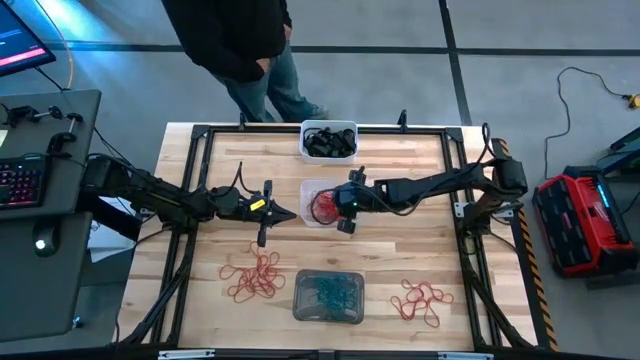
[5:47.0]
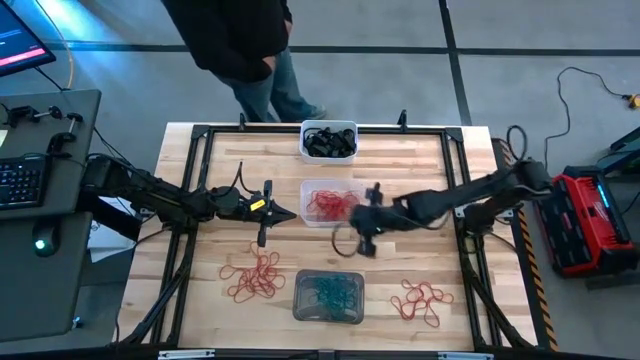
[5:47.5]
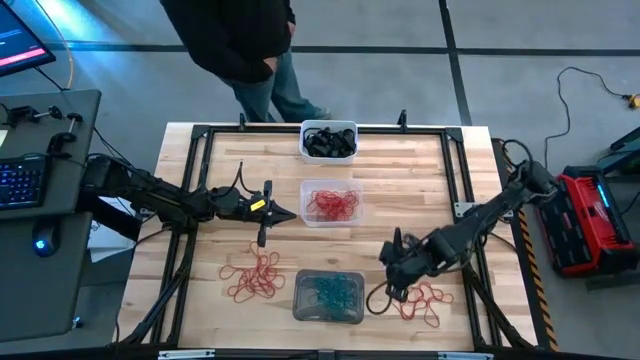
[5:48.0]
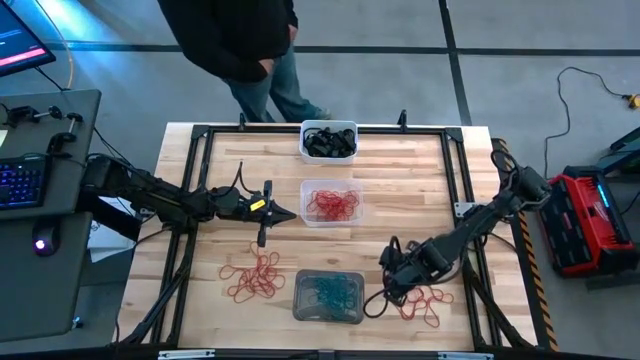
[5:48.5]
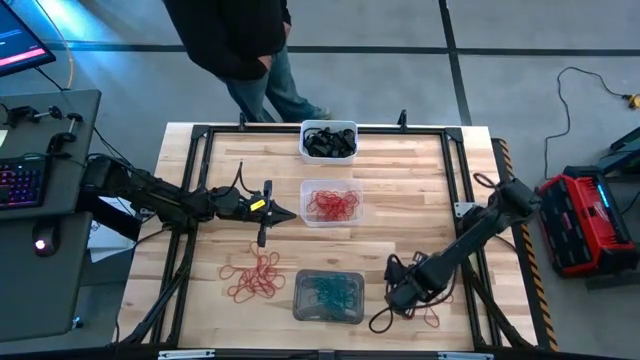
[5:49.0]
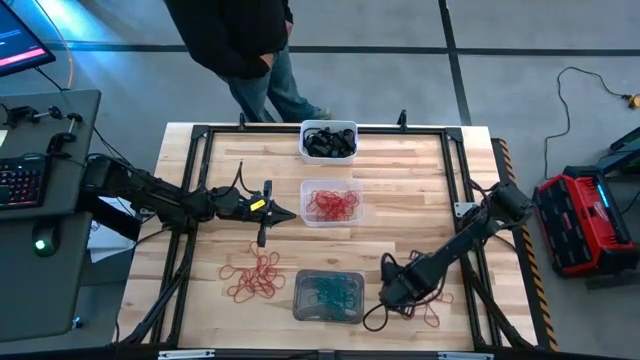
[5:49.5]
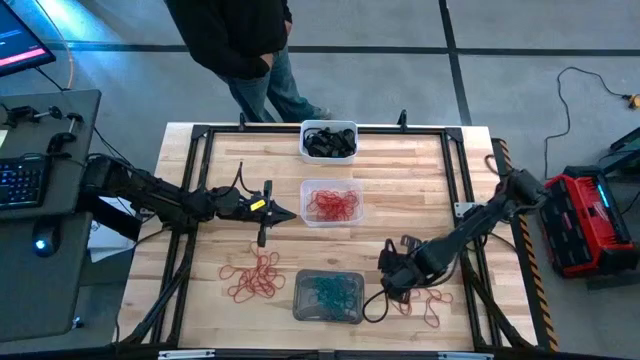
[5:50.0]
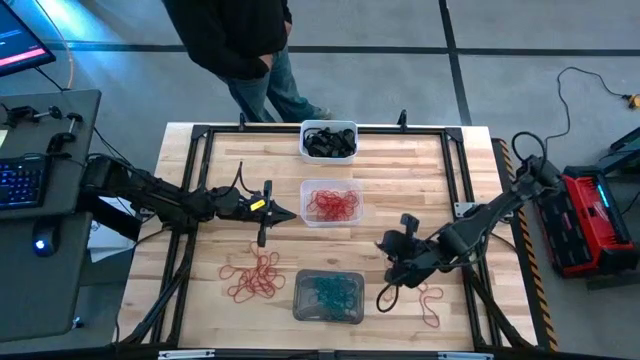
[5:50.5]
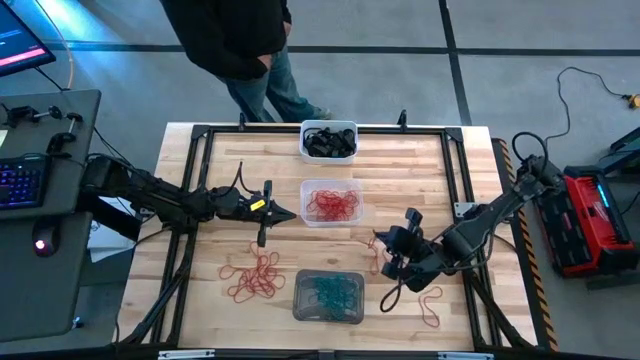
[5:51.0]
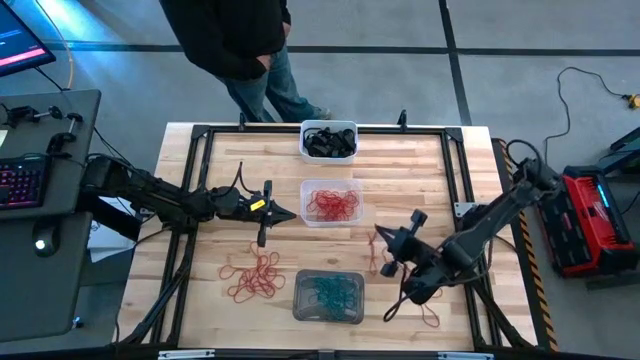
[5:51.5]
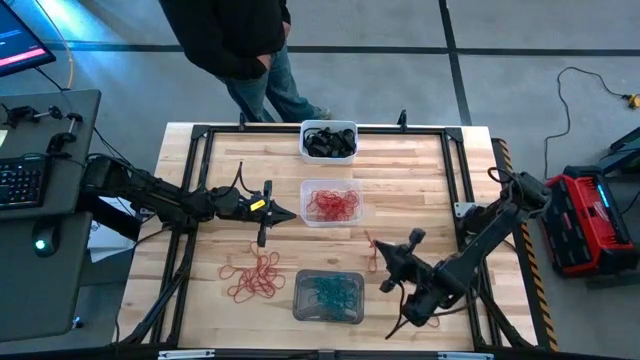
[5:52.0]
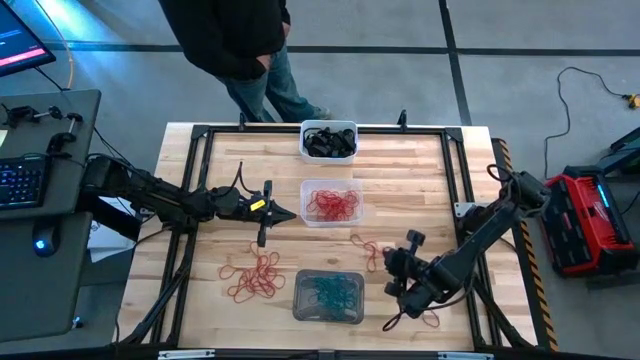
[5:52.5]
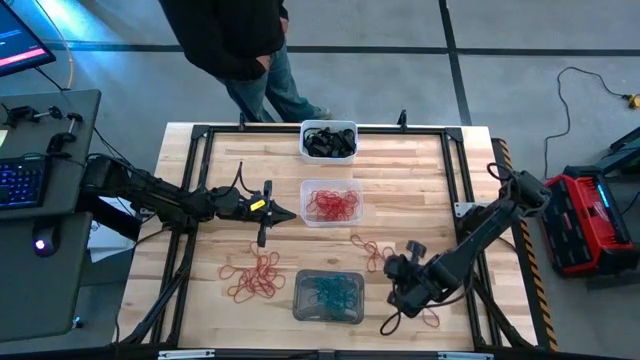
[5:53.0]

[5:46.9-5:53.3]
Task: Sort rubber bands into baskets
Put the red rubber band into the transparent bin

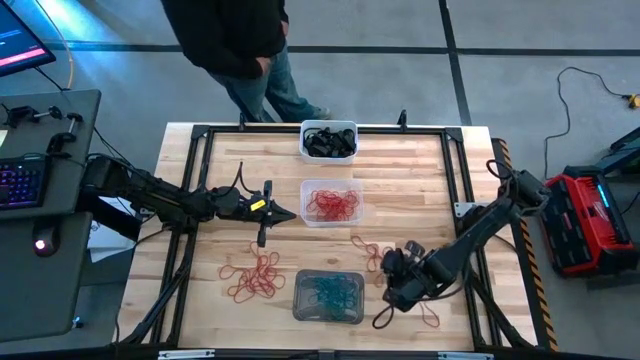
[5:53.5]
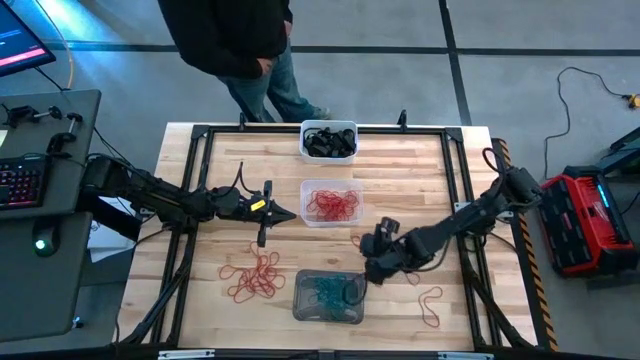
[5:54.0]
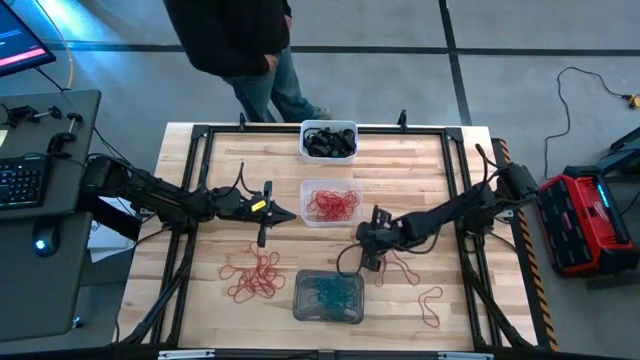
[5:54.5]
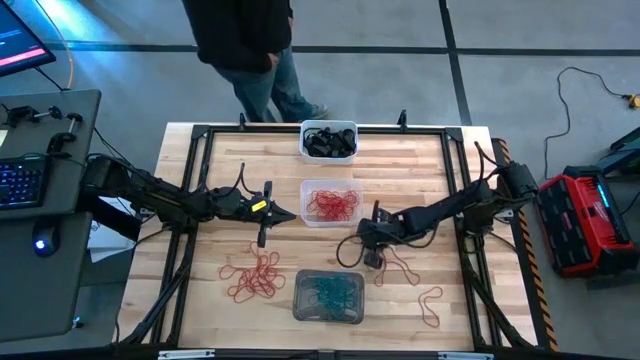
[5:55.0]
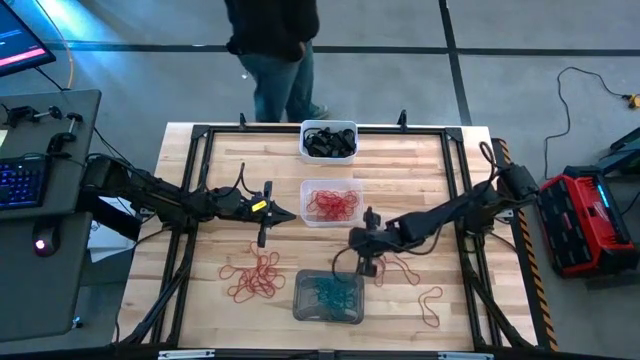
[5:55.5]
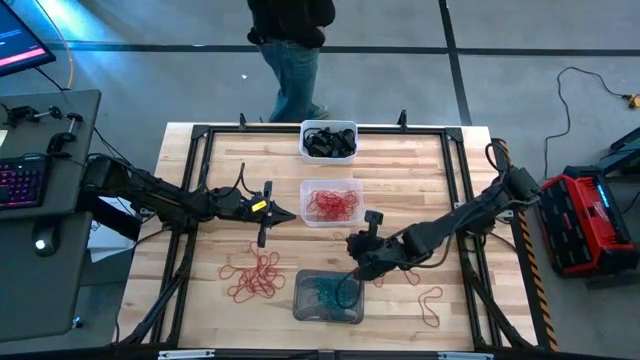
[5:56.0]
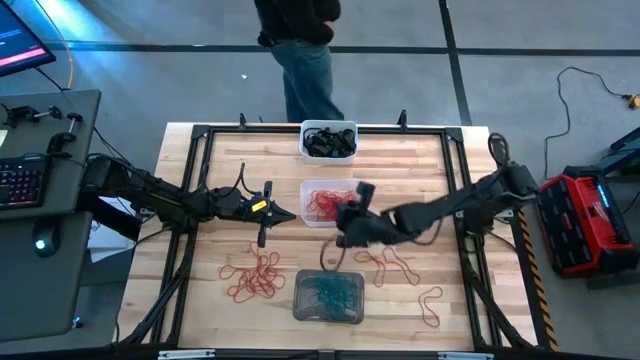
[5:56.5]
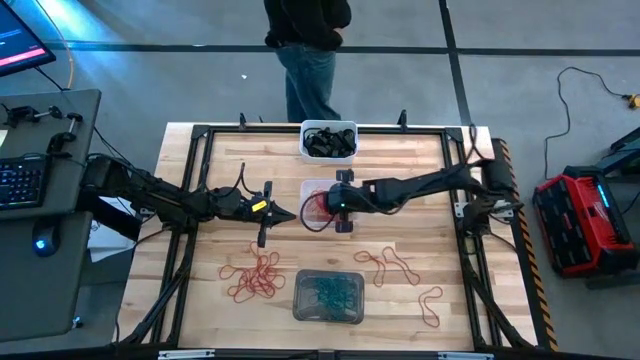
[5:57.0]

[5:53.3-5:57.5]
Put the red rubber band into the transparent bin

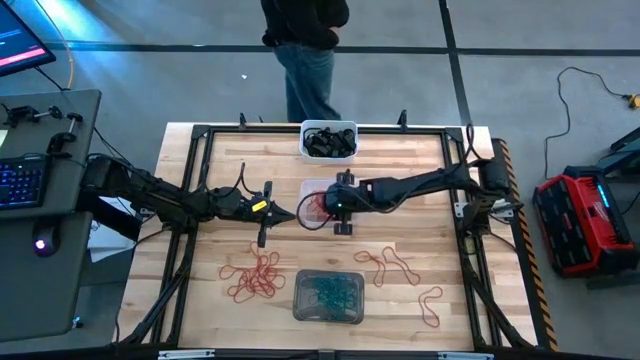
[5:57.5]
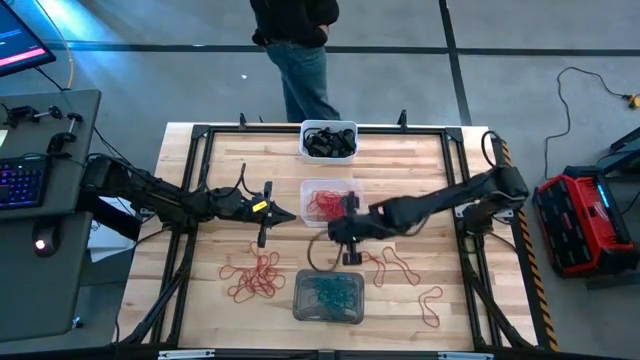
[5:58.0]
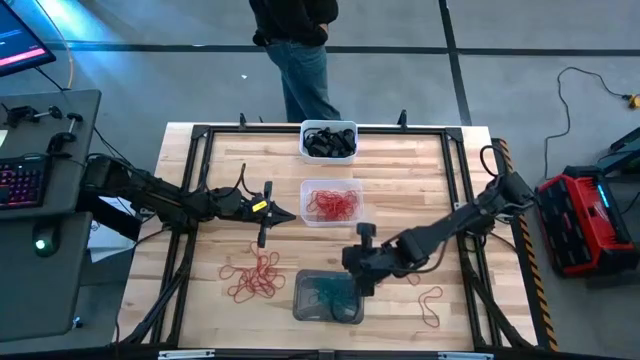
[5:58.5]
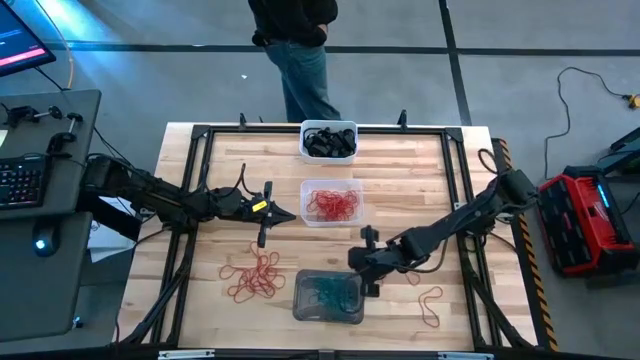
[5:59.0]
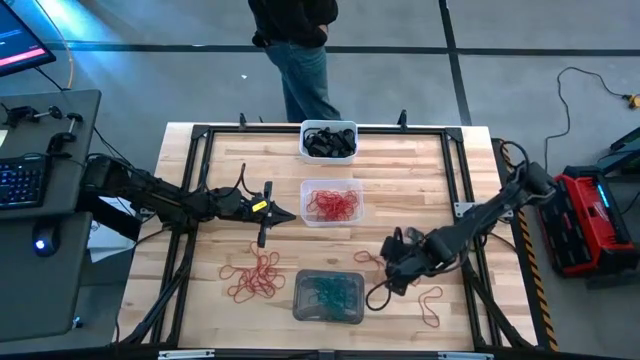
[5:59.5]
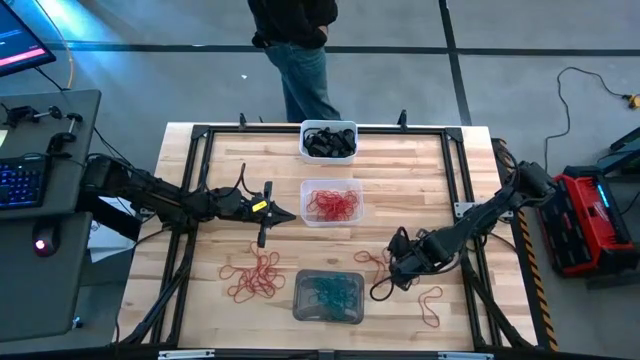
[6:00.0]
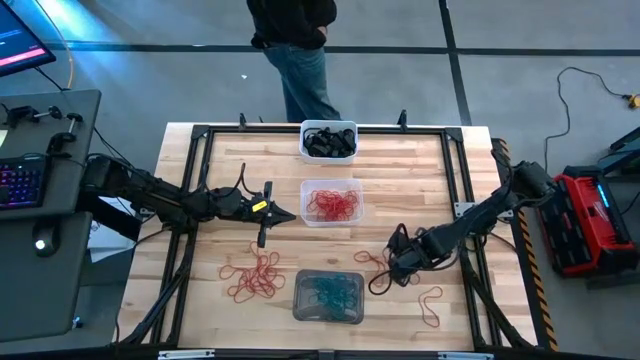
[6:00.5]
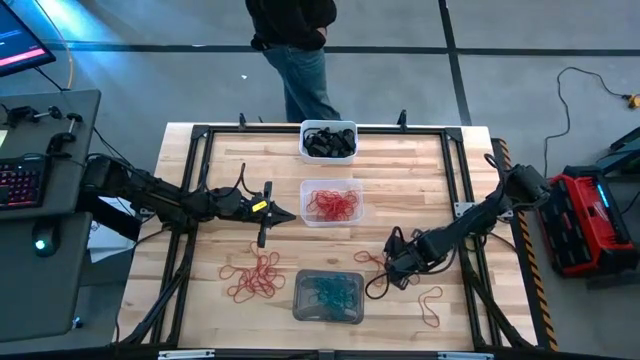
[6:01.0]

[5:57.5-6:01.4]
Put the red rubber band into the transparent bin

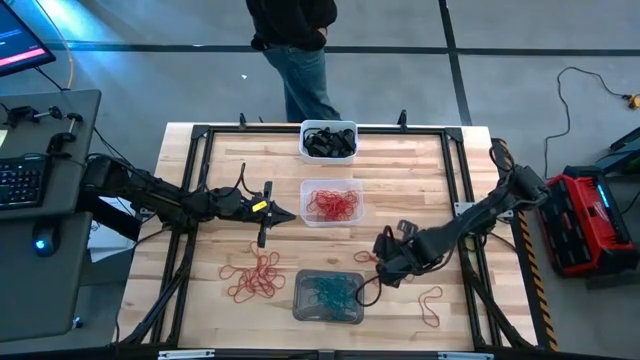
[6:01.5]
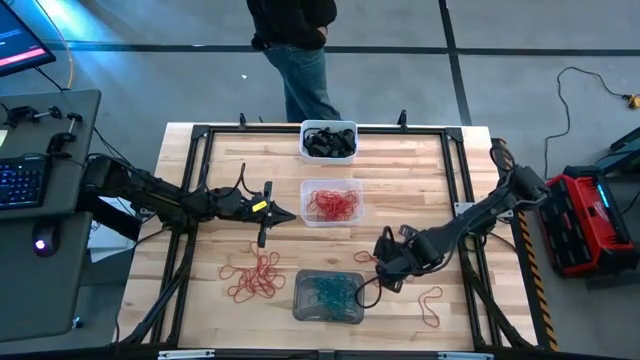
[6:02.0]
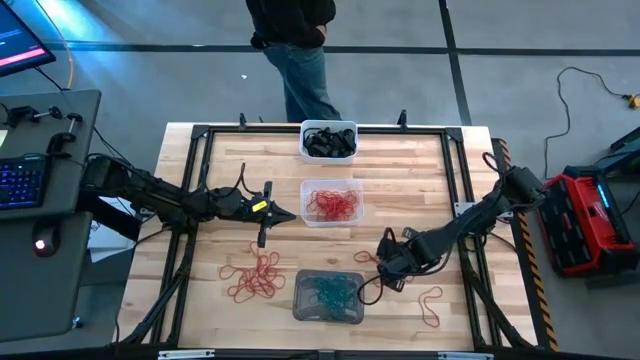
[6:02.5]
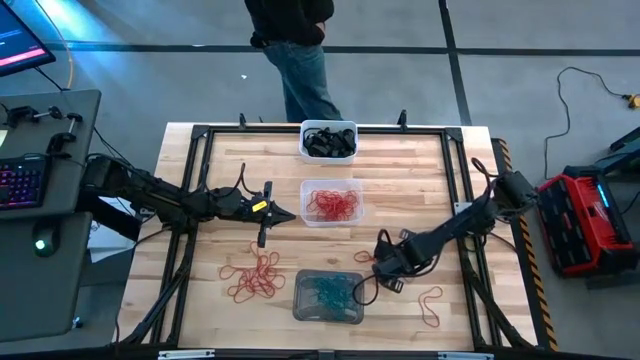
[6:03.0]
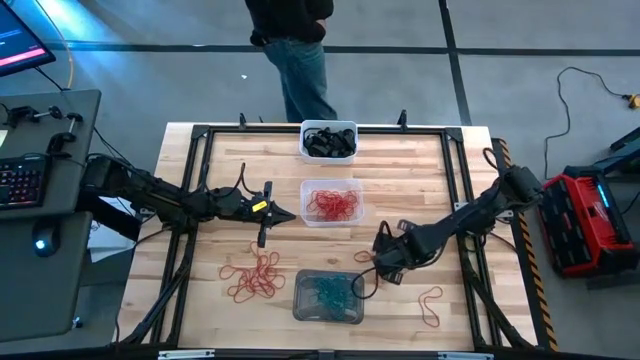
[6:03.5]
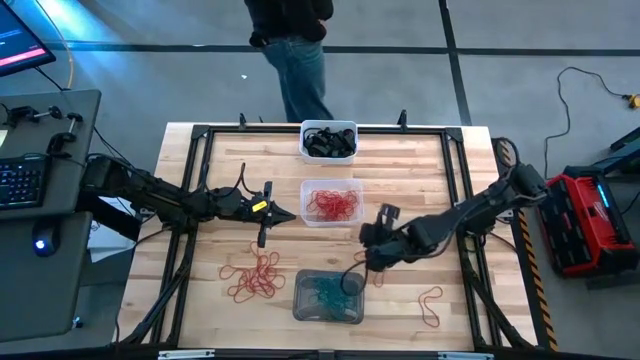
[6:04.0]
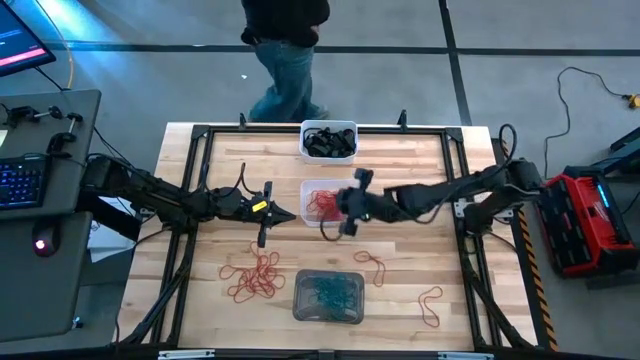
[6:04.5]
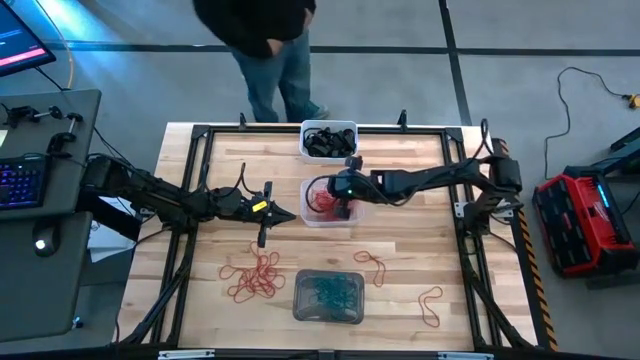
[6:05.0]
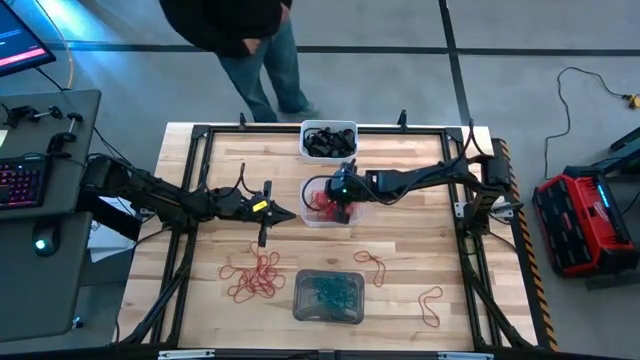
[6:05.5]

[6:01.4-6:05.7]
Put the red rubber band into the transparent bin

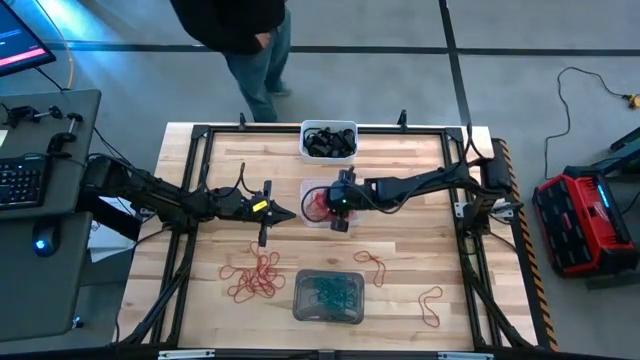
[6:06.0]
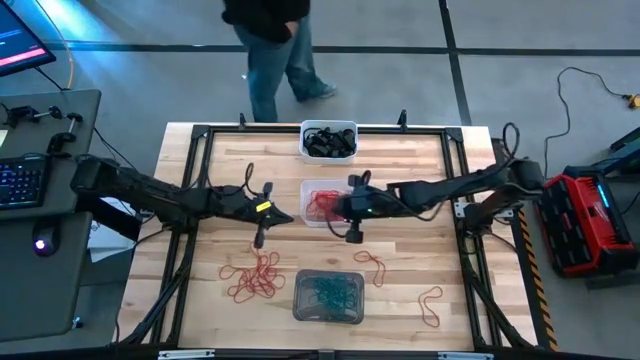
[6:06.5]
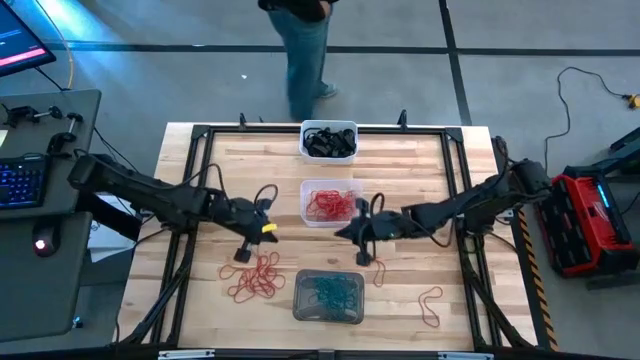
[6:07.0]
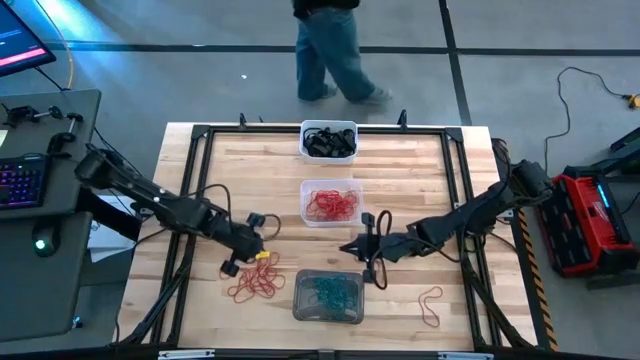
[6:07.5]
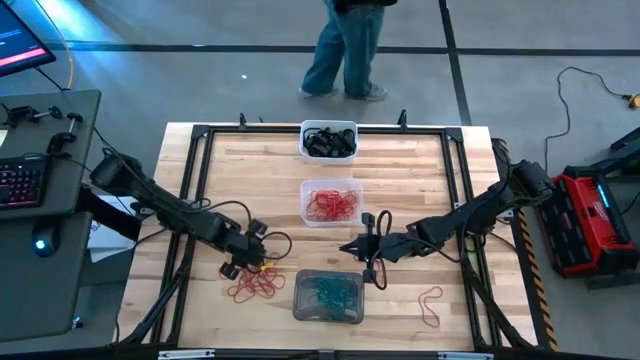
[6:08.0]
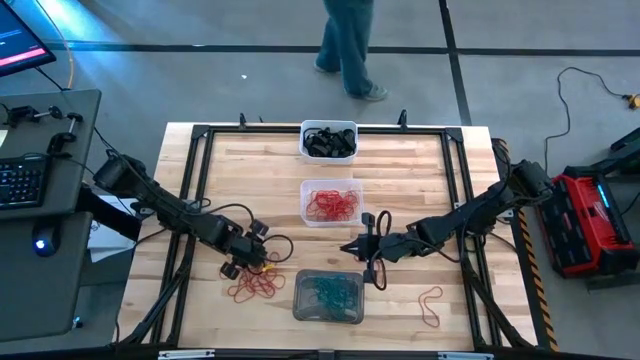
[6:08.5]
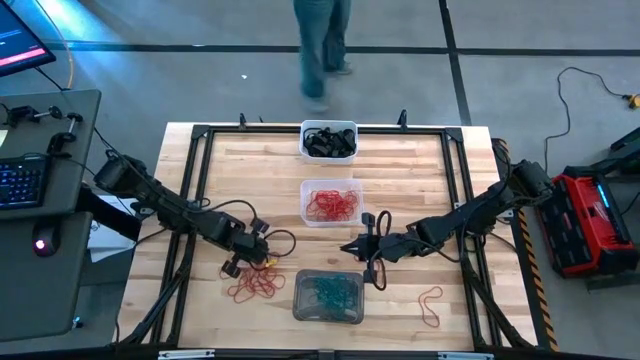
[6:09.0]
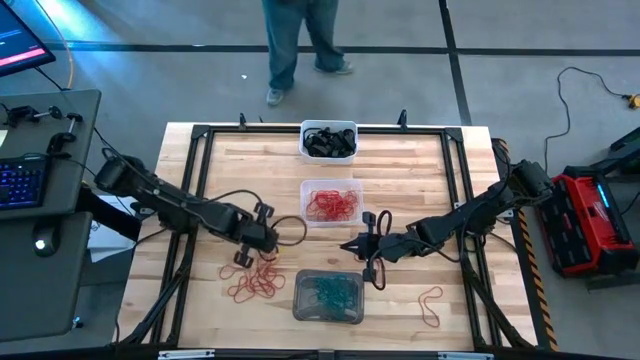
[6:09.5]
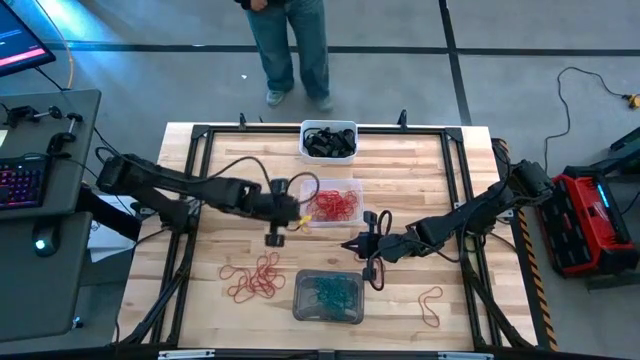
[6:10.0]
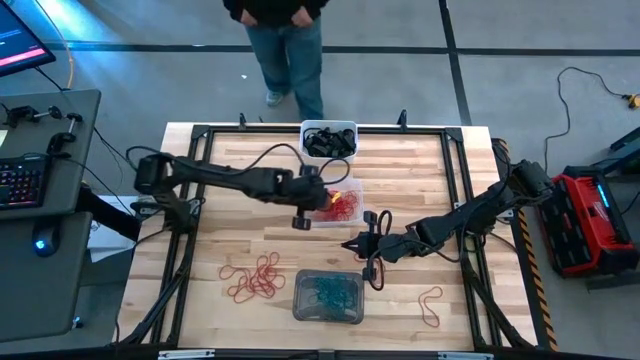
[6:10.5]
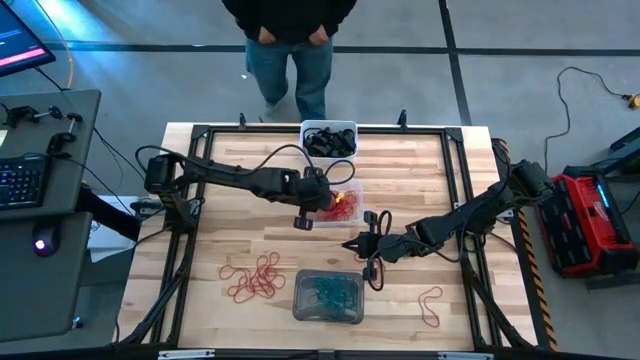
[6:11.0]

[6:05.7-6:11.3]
Put the red rubber band into the transparent bin
